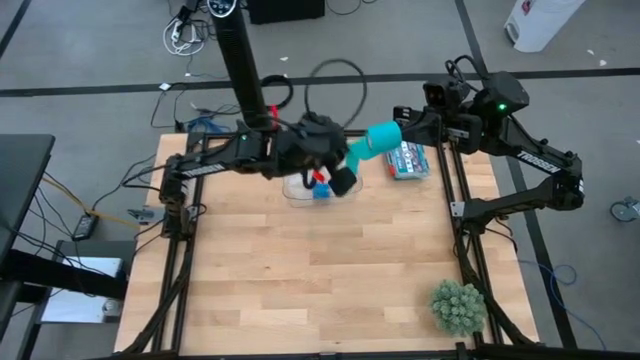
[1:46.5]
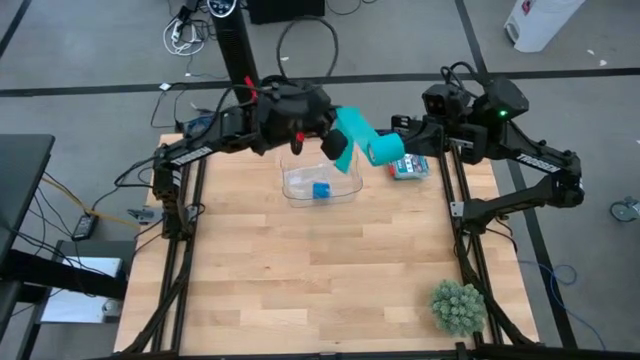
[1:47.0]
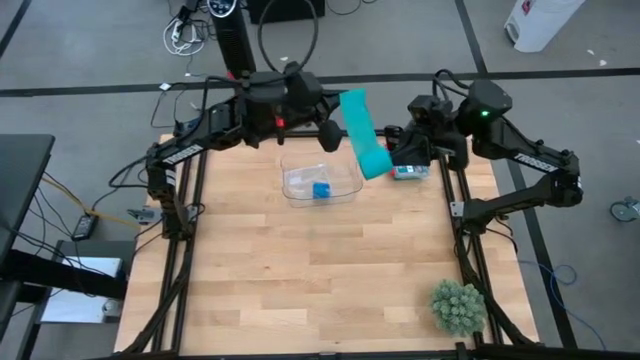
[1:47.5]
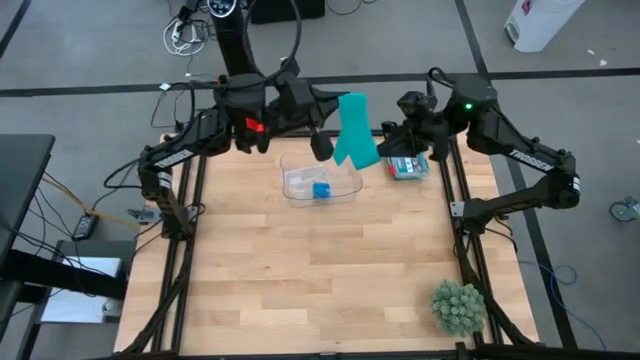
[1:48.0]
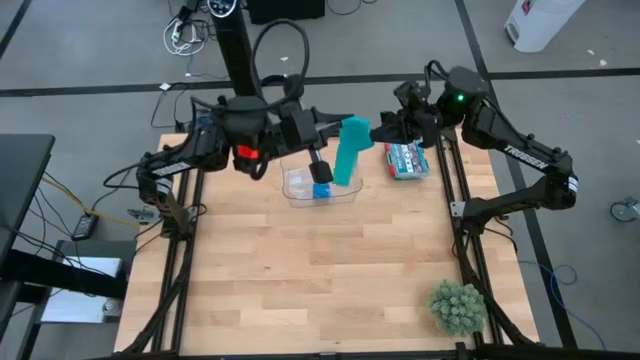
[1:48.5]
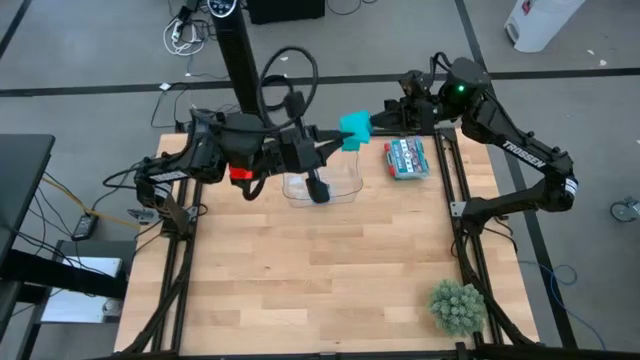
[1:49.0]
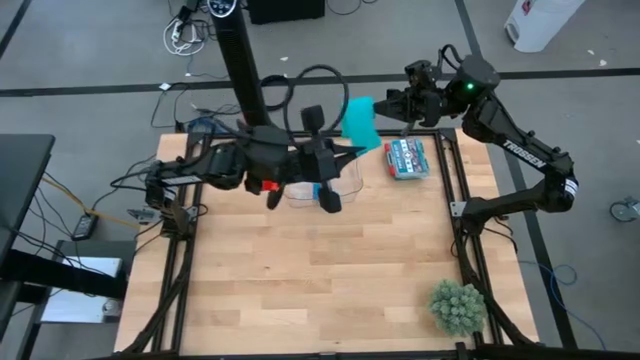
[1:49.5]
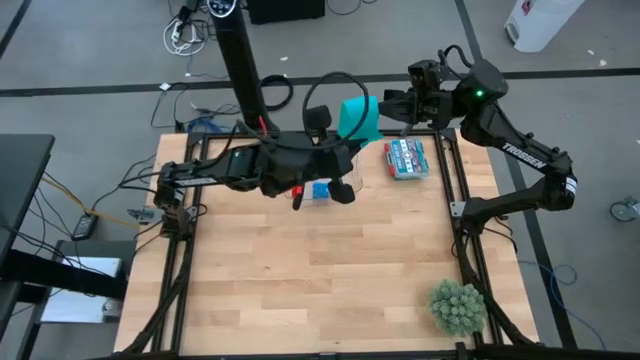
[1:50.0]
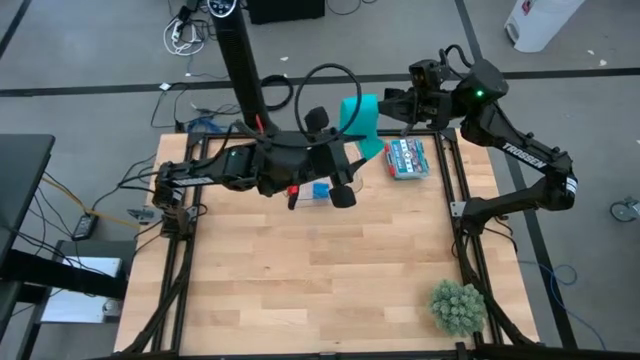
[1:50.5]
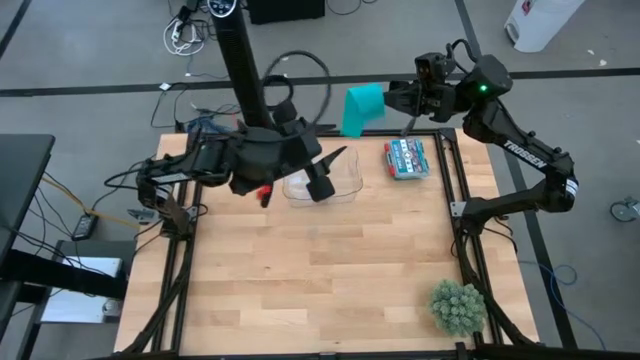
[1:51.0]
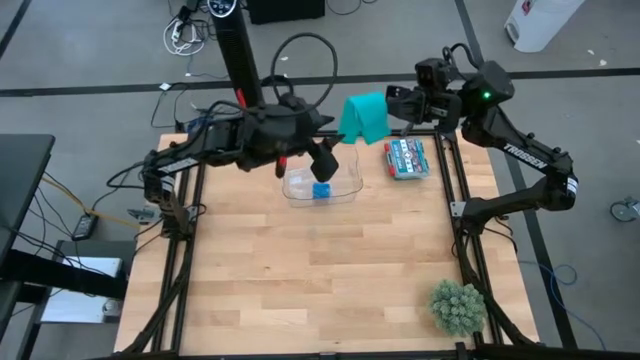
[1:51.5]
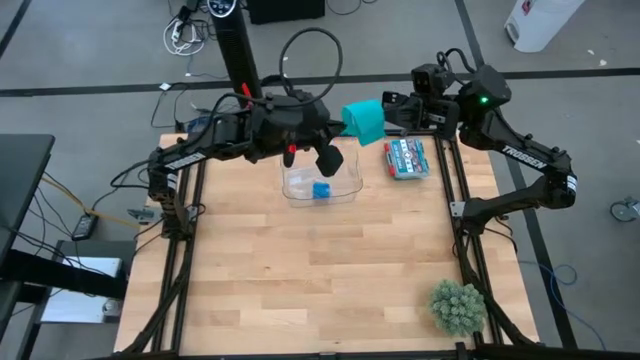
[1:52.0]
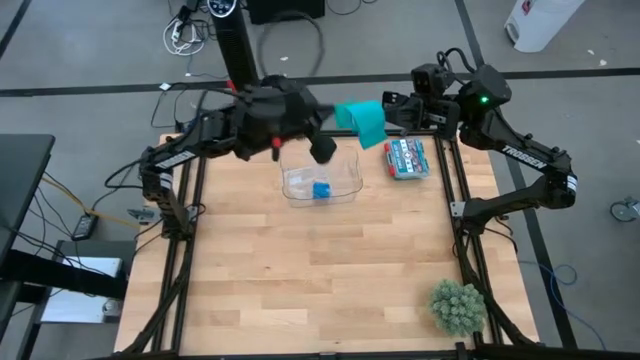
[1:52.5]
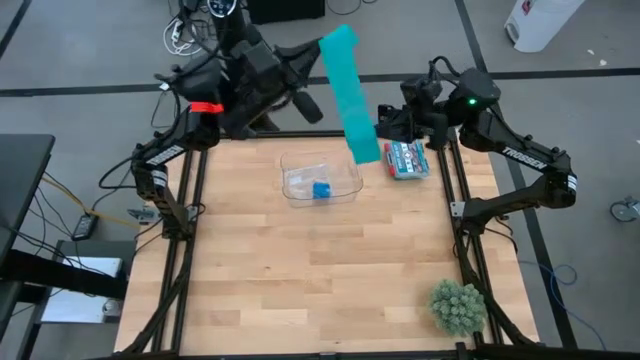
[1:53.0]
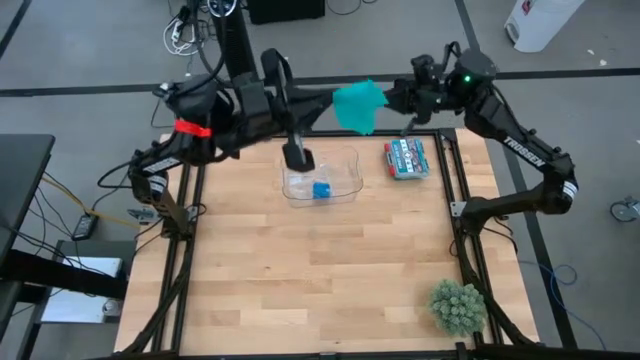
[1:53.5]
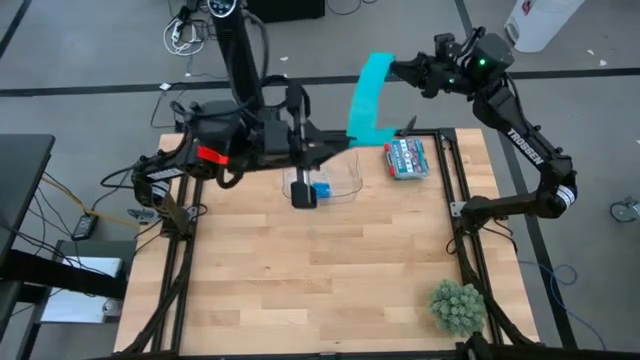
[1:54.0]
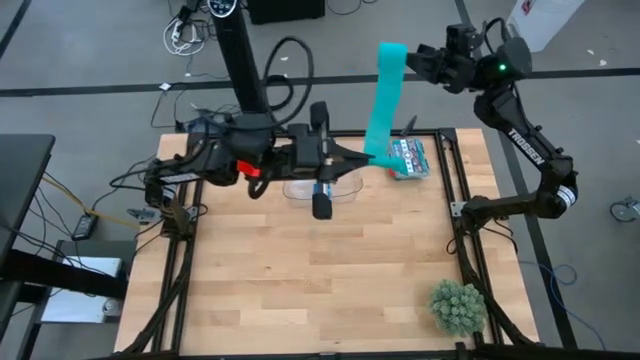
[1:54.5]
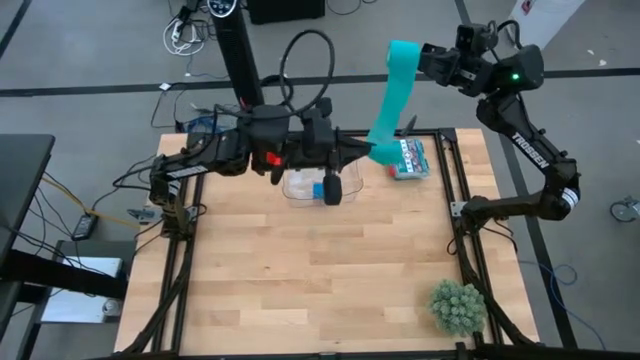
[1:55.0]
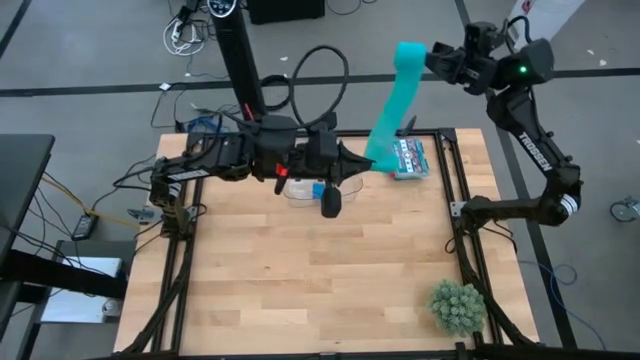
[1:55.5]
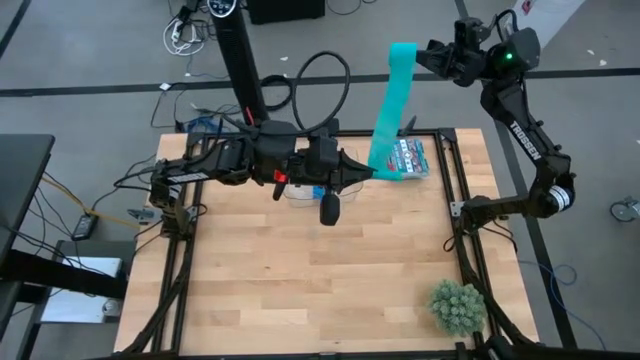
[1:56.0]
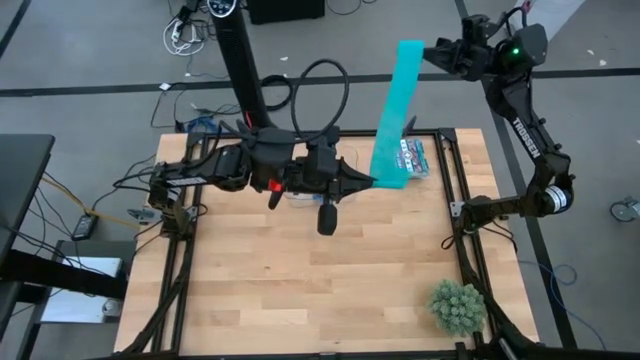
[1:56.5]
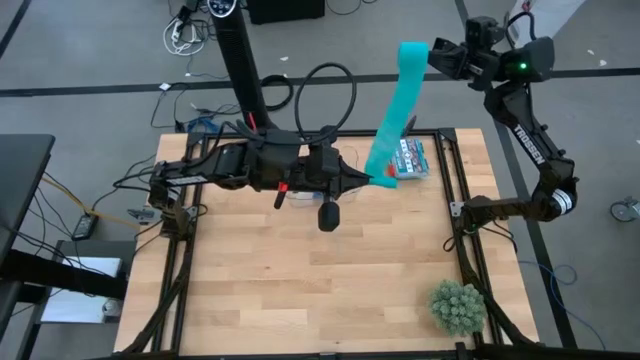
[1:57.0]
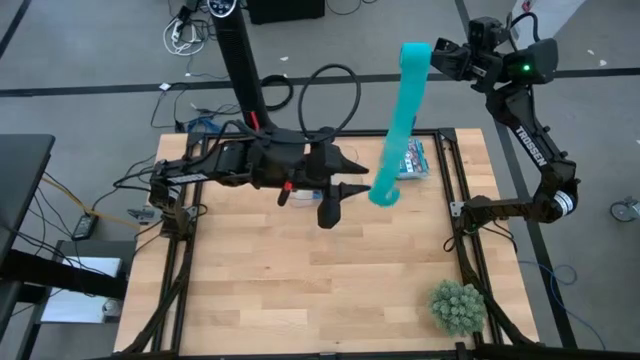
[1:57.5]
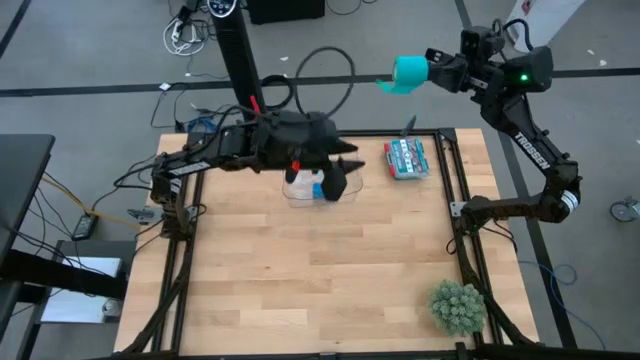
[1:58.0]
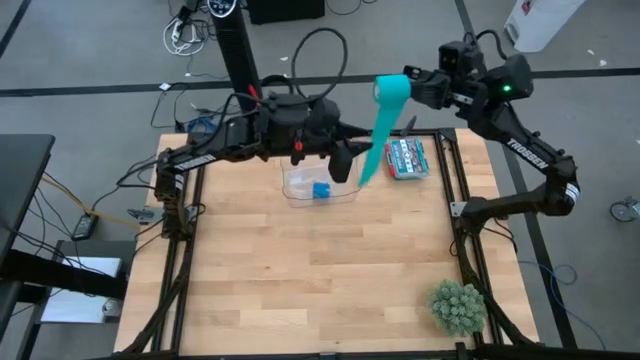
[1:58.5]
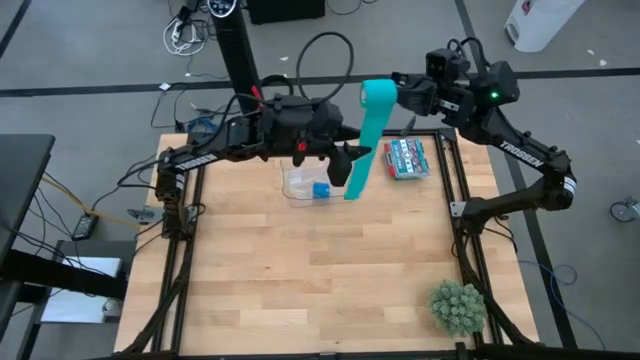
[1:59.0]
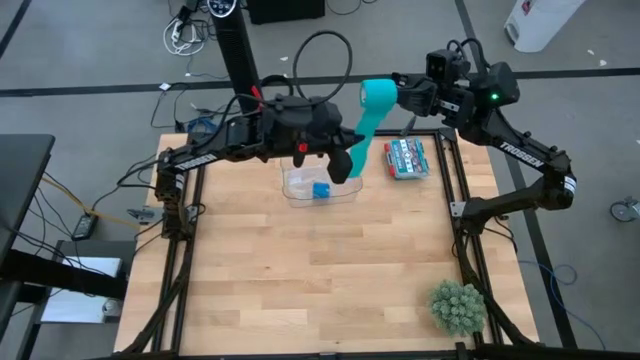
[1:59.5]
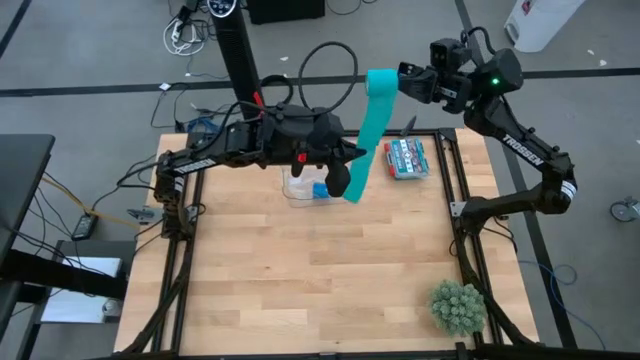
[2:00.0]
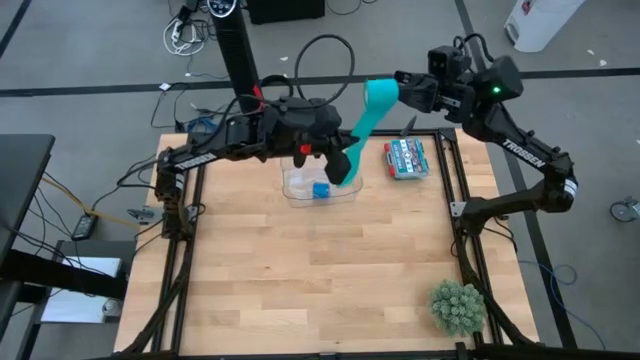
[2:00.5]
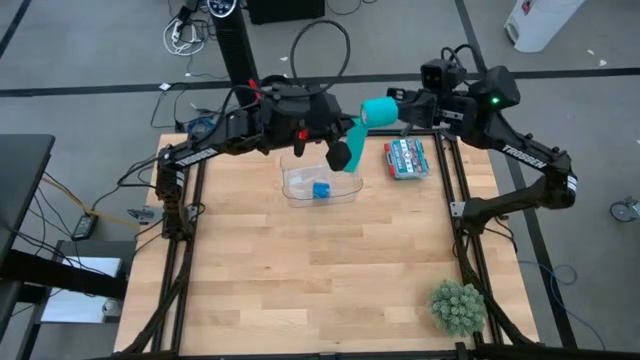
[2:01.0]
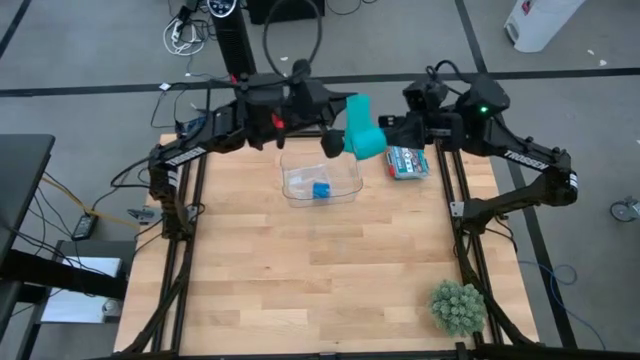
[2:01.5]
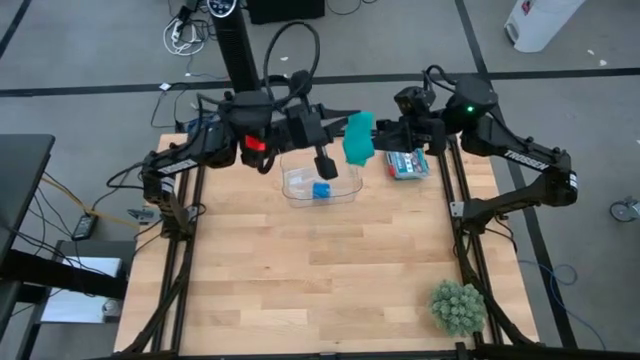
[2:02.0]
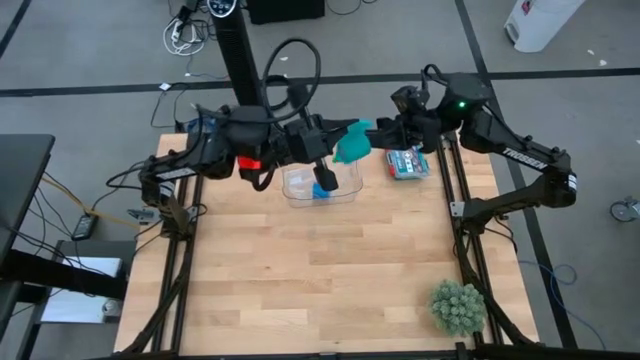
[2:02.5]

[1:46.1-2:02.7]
Task: Roll bandage
Roll the sky blue bandage

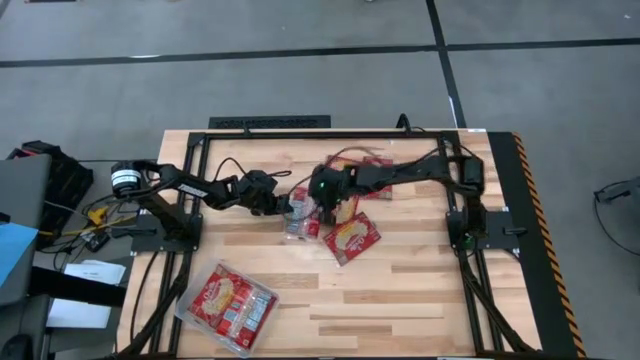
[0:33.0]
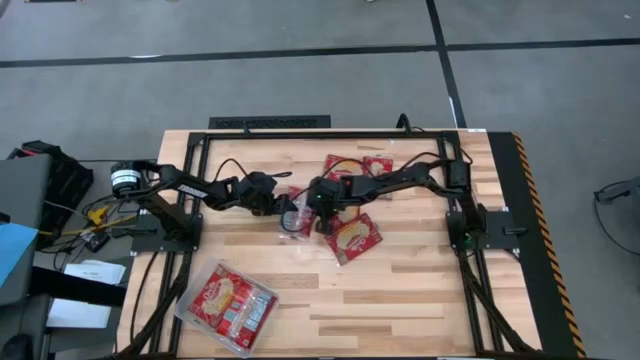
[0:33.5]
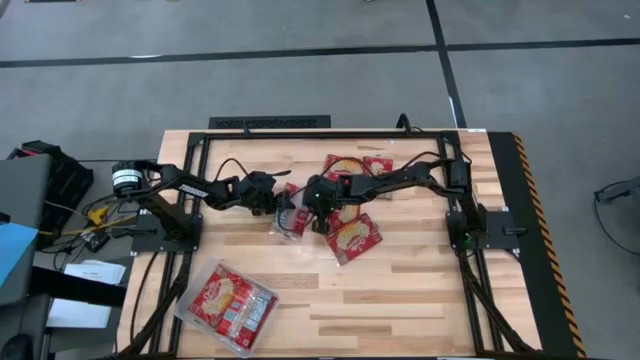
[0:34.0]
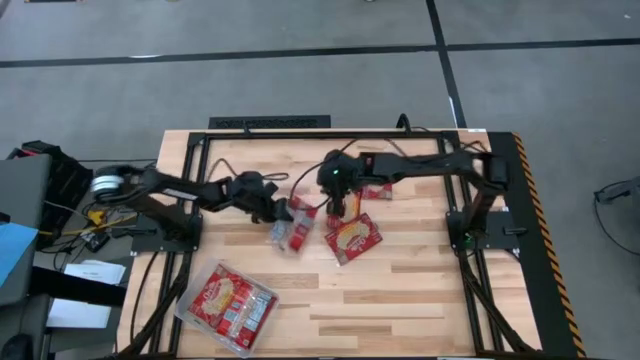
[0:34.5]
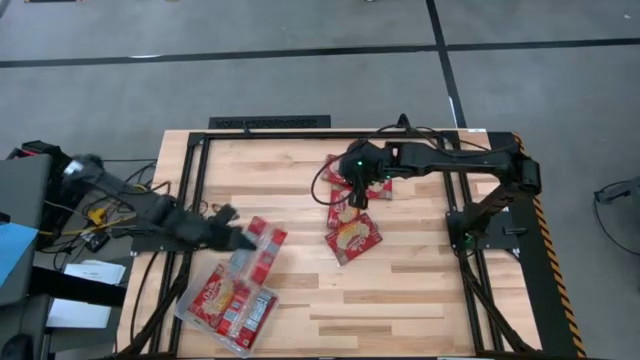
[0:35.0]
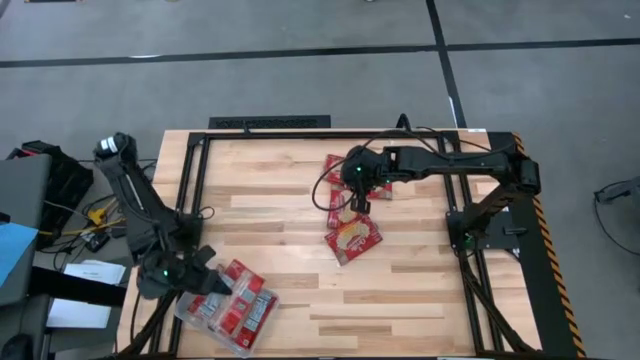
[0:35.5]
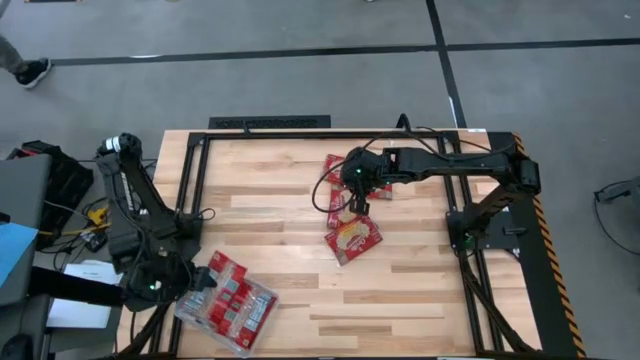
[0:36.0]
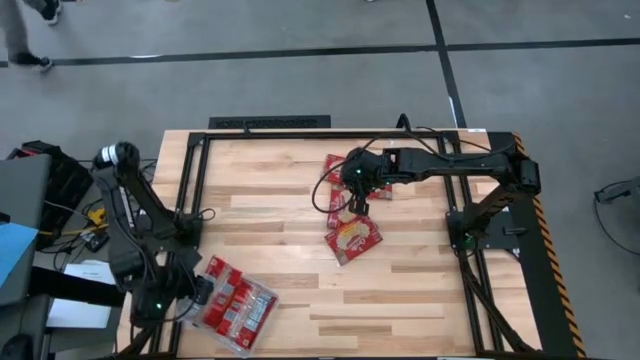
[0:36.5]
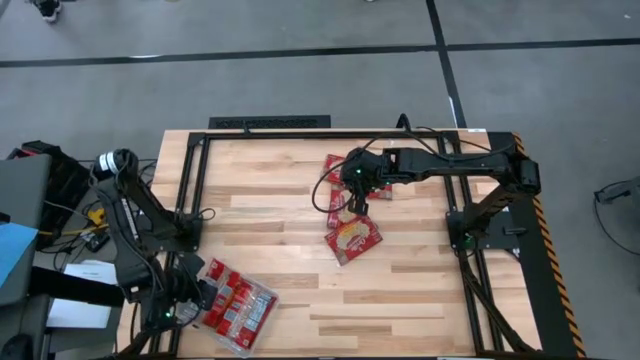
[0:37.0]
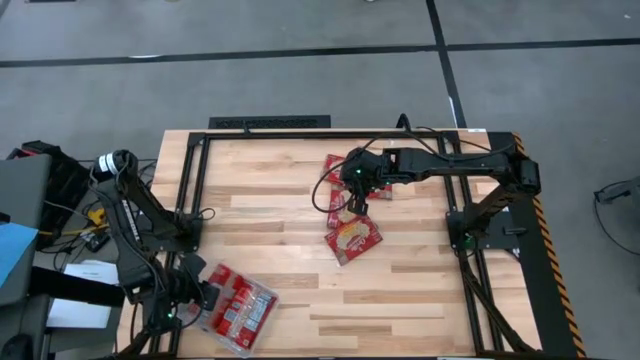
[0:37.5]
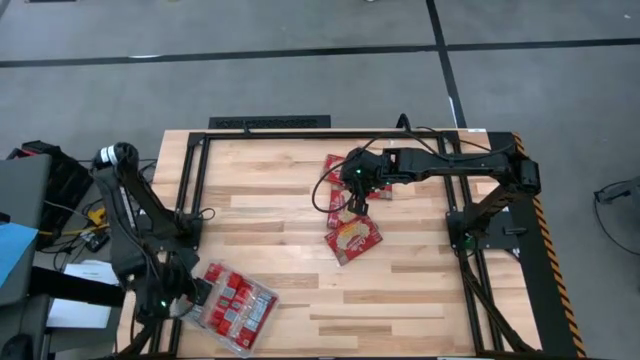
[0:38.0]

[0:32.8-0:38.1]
Task: Sort popcorn bags into baskets
Put the red popcorn bag into the transparent bin
